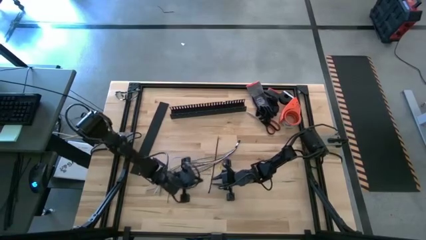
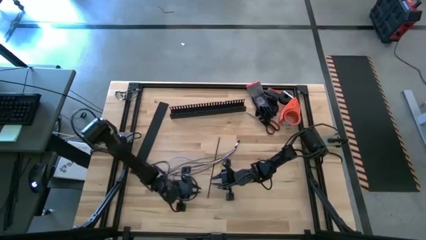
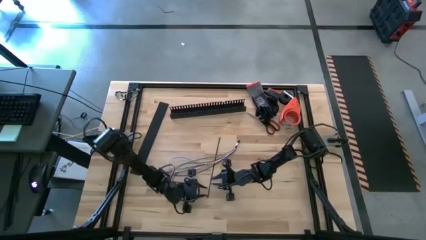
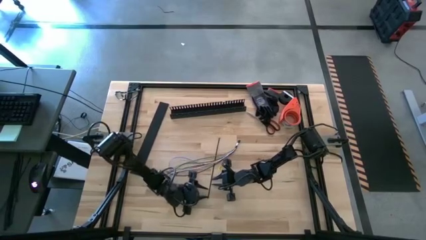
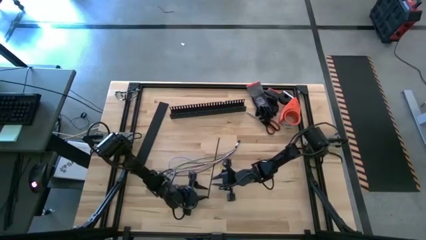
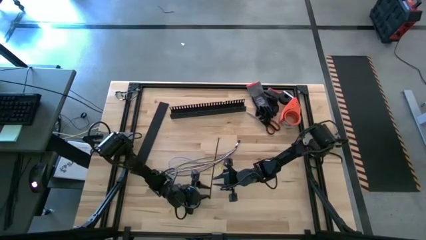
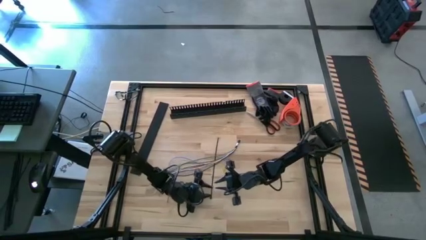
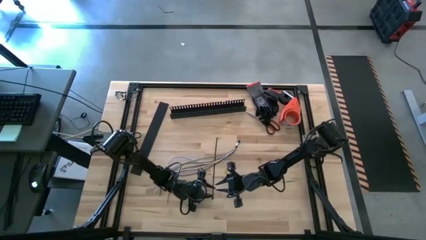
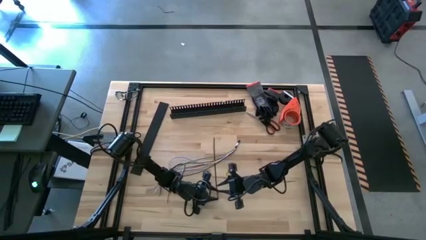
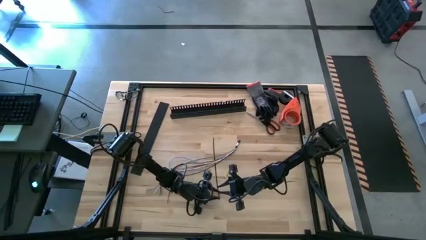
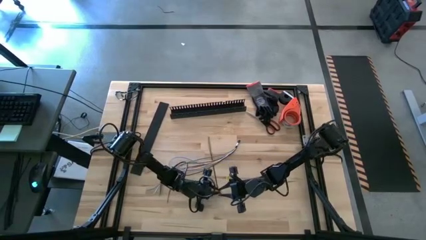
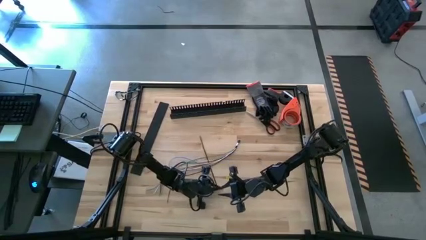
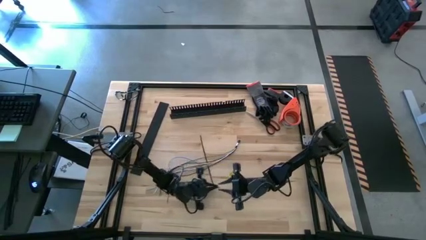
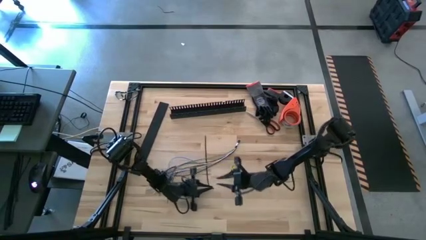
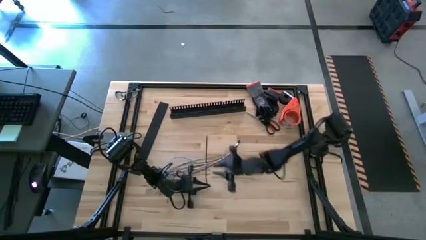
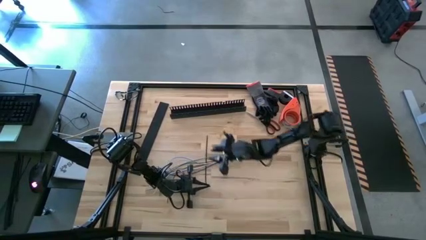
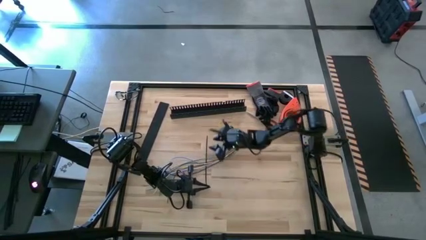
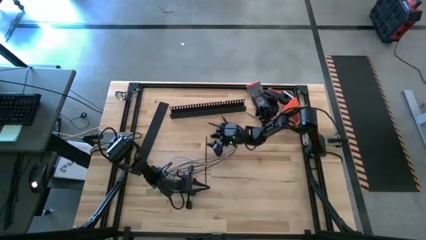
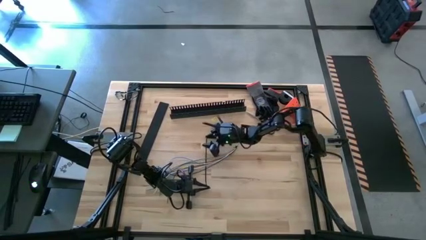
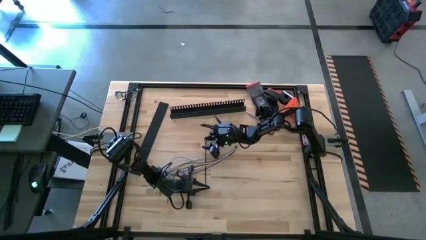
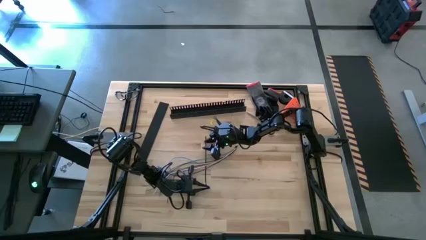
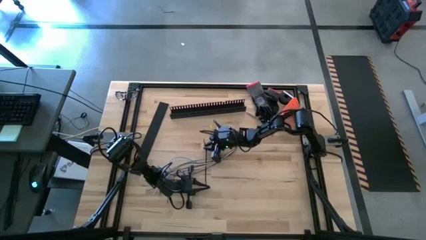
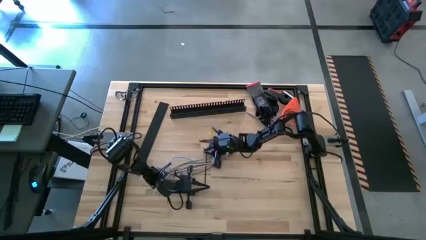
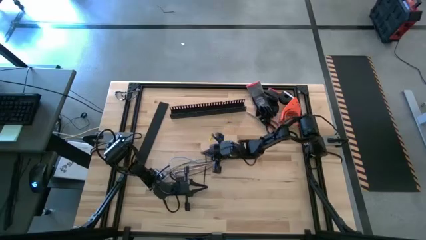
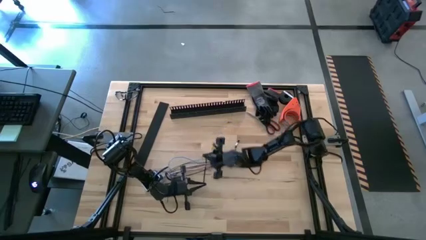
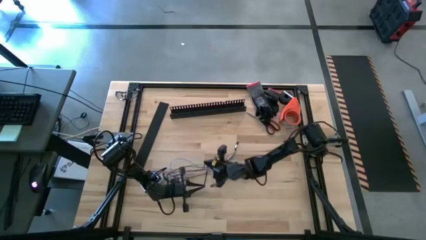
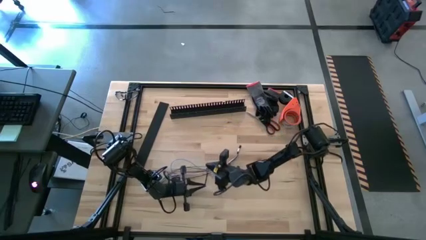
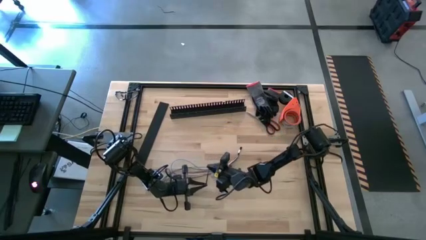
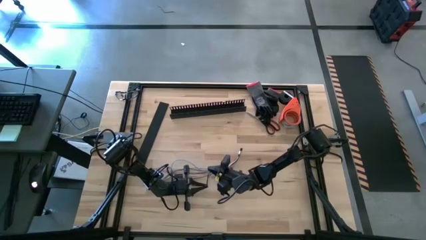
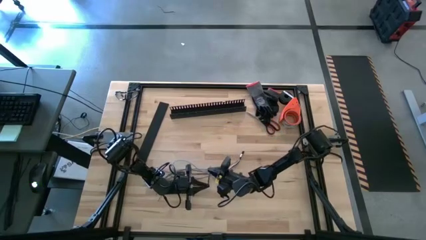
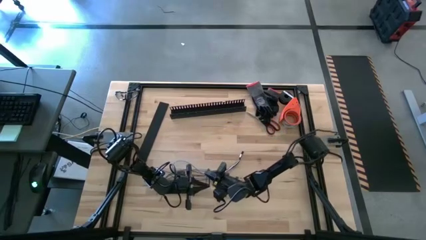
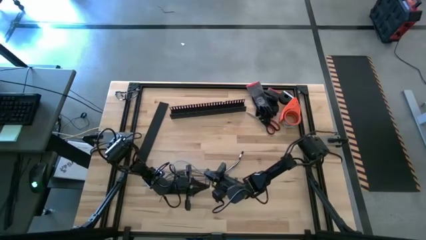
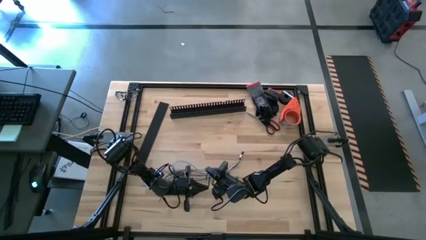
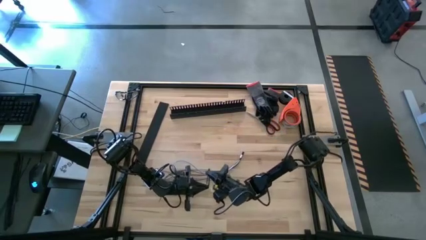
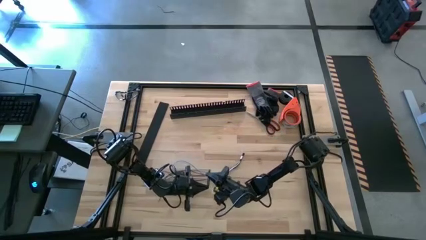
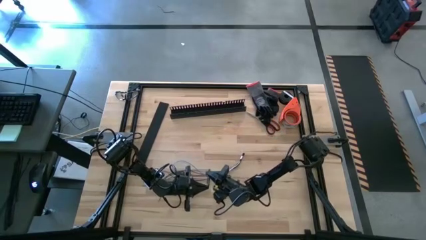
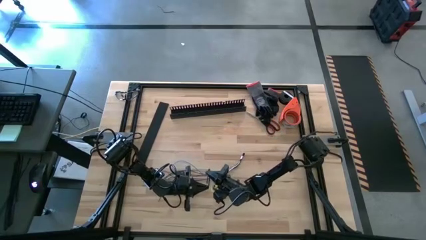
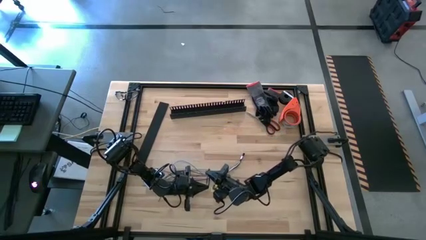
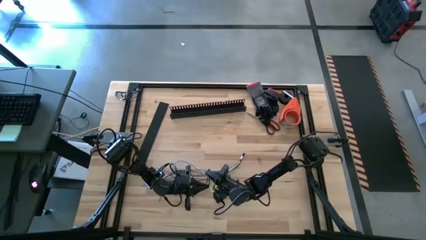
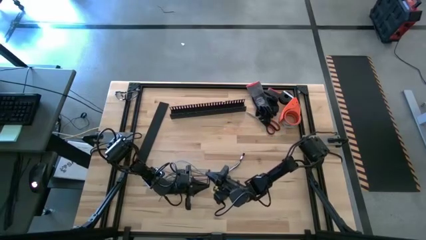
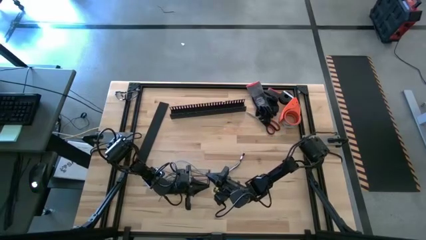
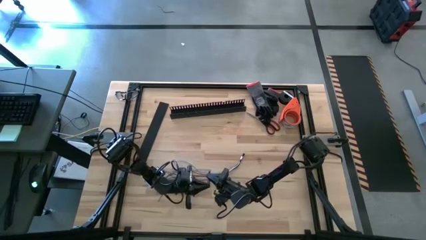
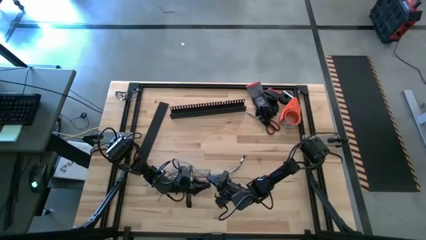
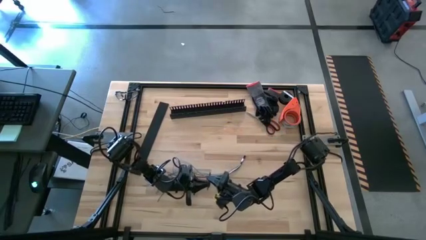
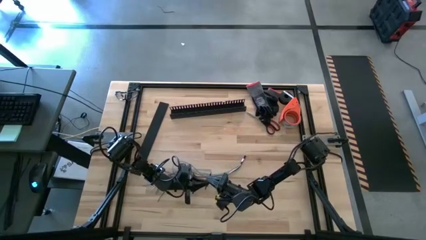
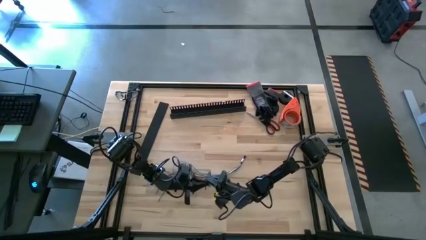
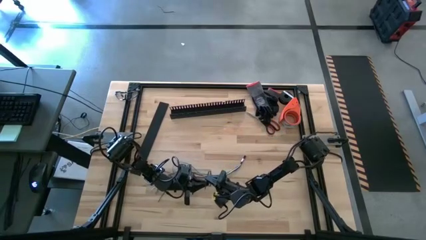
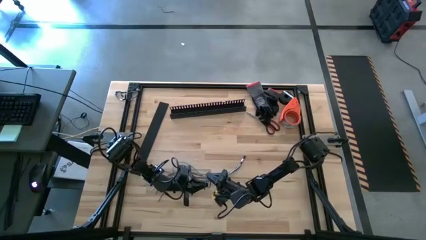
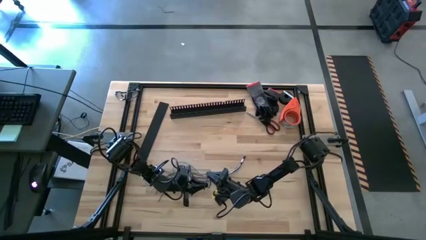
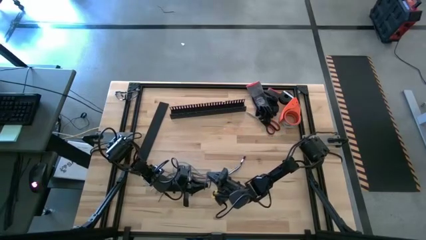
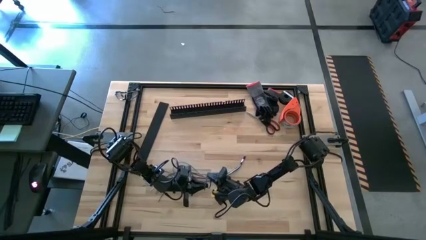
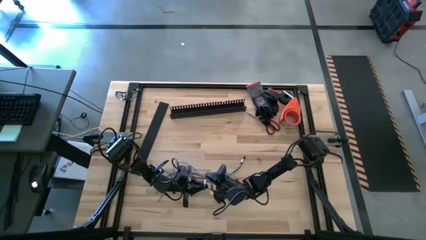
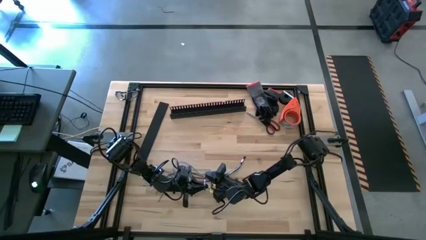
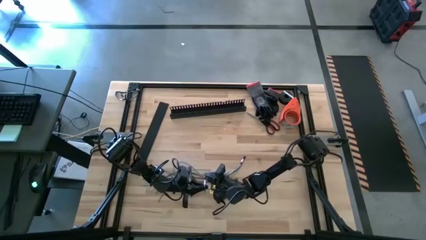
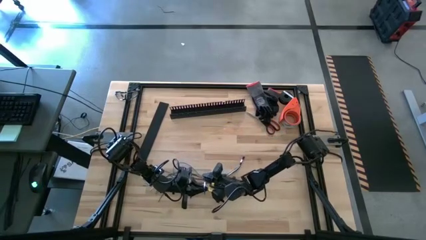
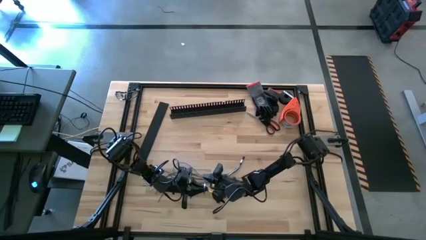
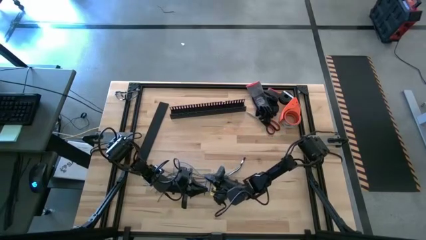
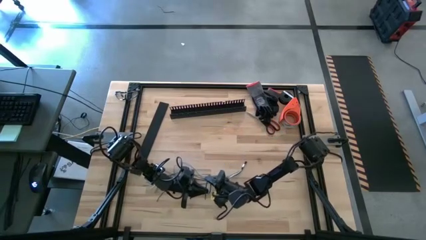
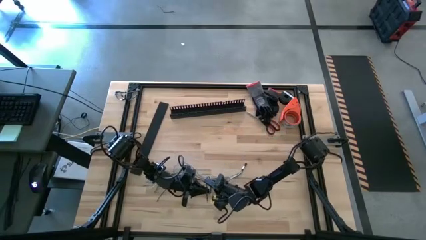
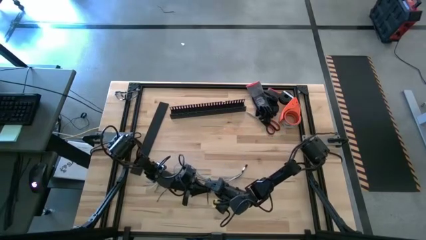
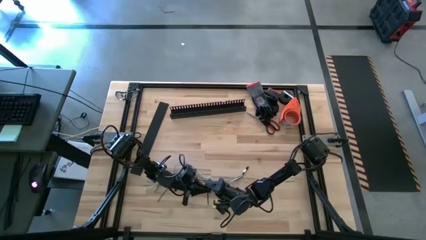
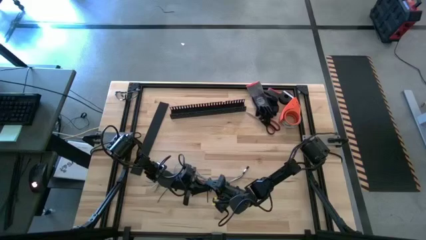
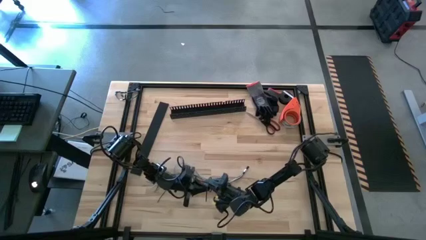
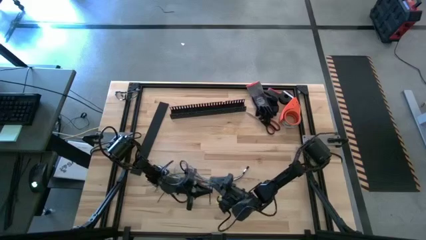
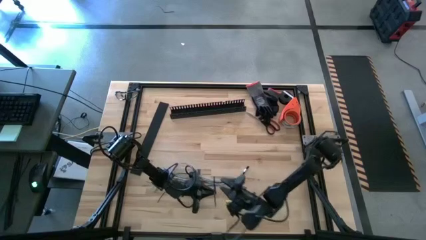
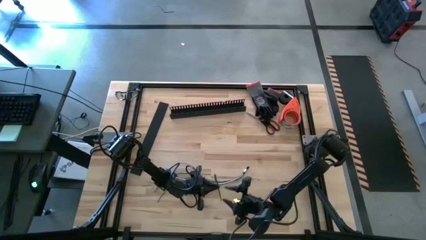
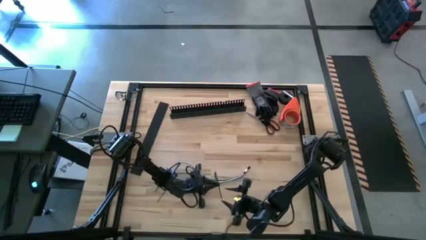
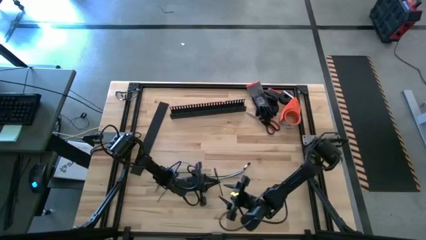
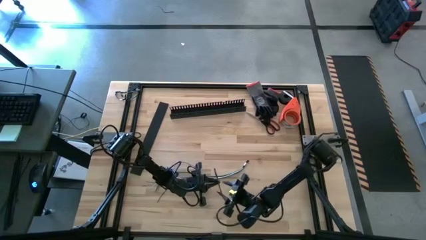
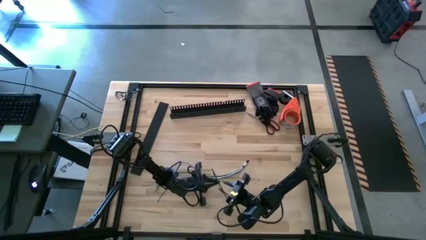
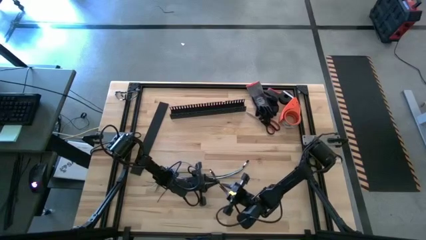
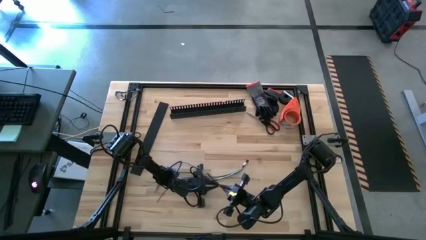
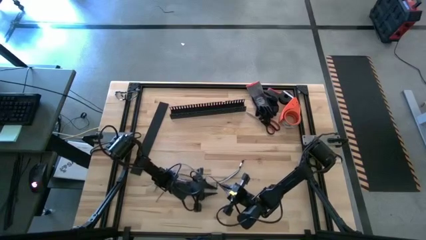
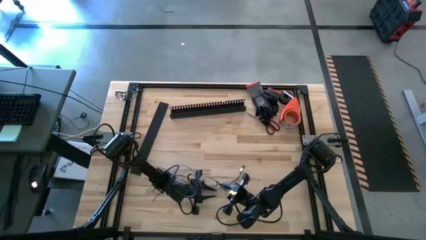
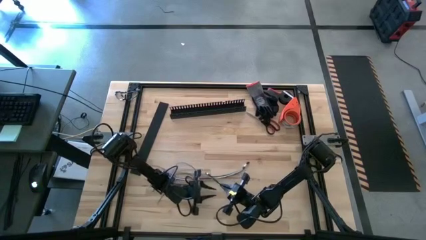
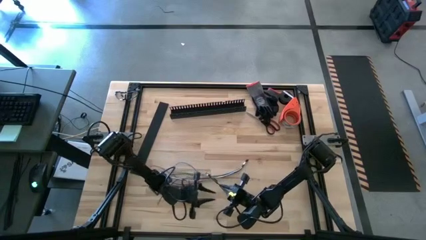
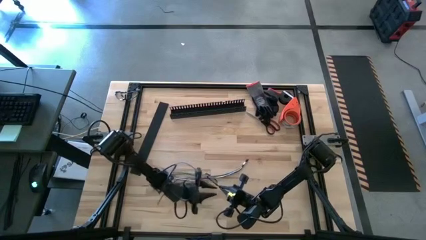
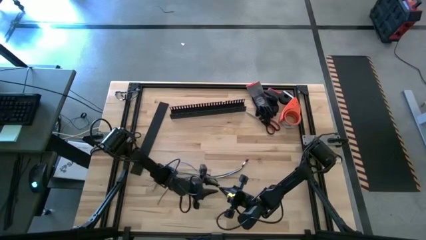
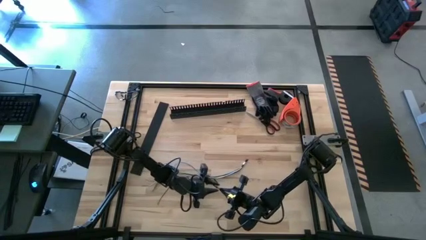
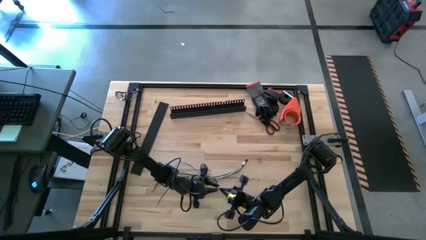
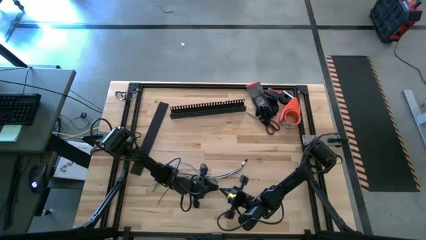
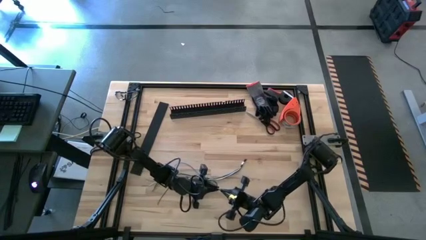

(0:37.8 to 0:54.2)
Task: Ziptie cables
Wrap the cables together using a black zip tie
